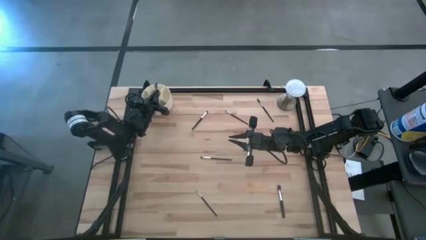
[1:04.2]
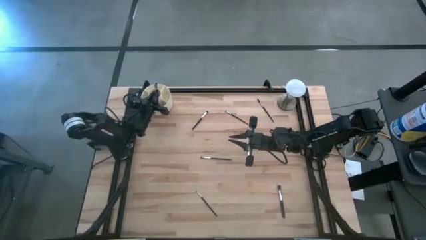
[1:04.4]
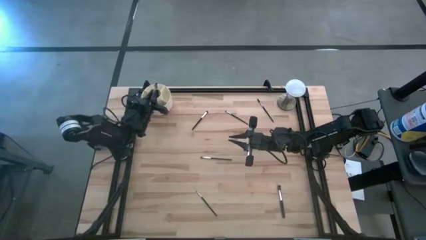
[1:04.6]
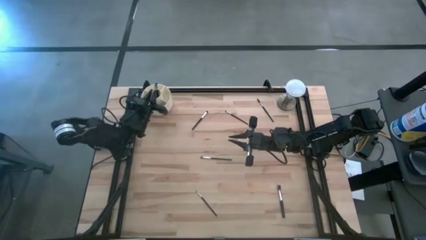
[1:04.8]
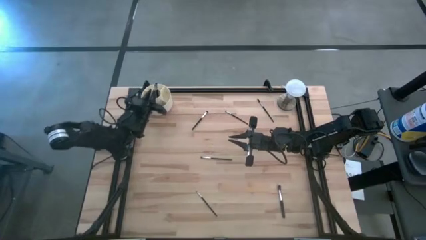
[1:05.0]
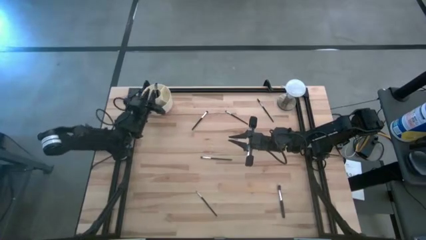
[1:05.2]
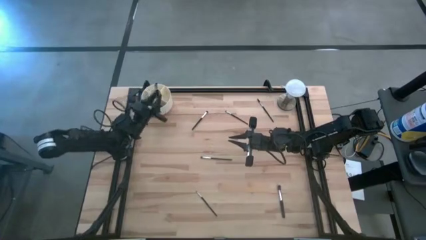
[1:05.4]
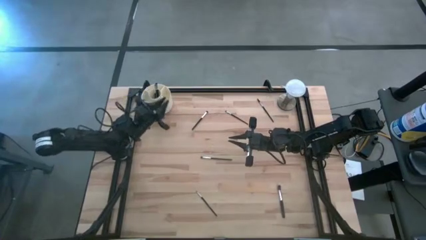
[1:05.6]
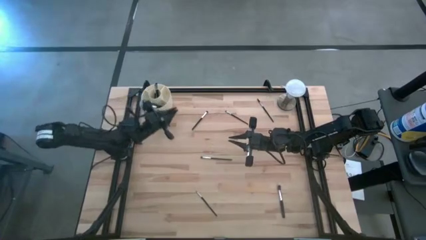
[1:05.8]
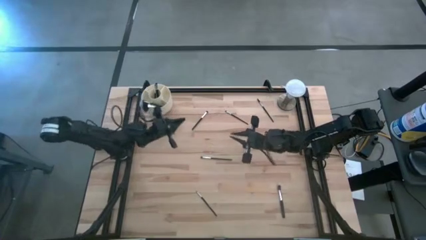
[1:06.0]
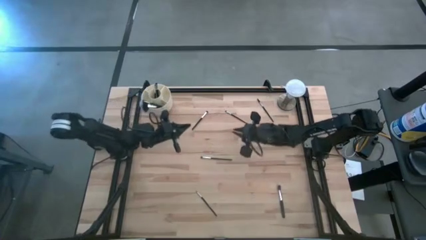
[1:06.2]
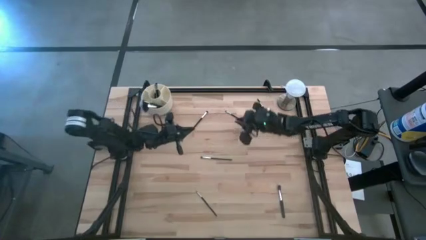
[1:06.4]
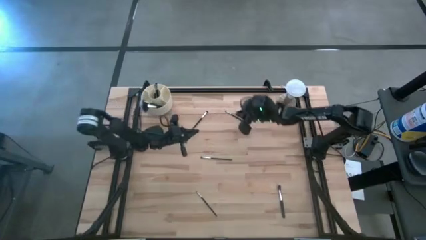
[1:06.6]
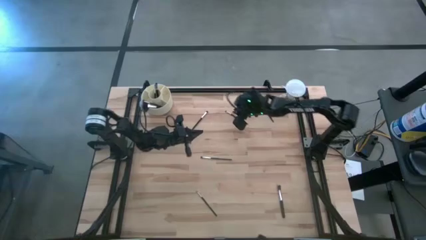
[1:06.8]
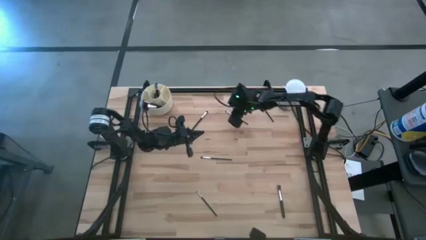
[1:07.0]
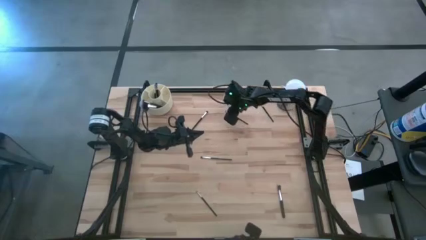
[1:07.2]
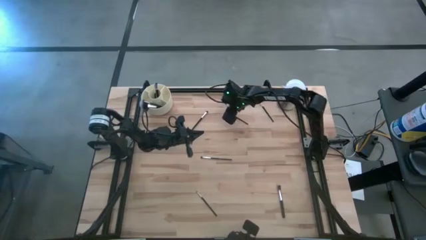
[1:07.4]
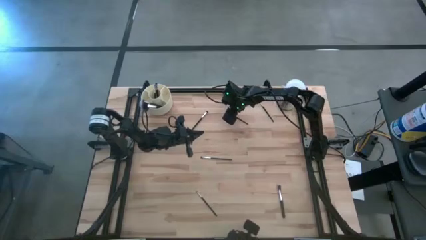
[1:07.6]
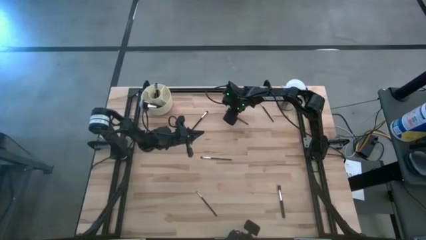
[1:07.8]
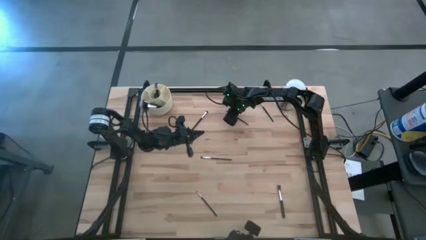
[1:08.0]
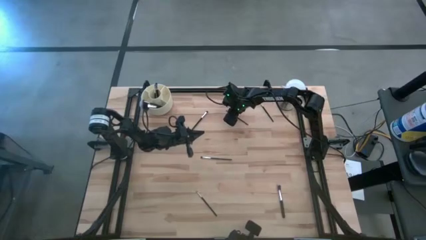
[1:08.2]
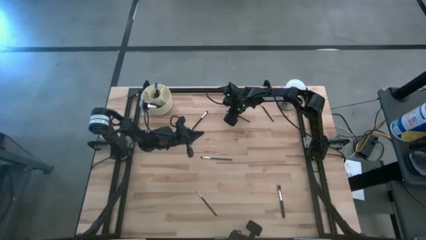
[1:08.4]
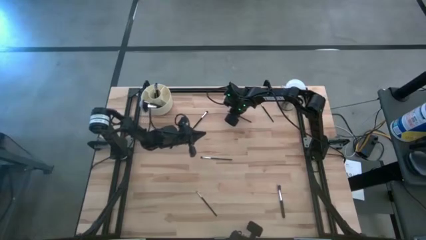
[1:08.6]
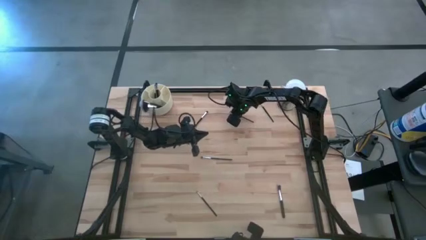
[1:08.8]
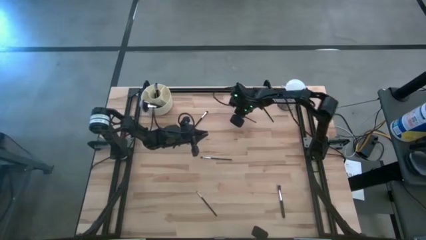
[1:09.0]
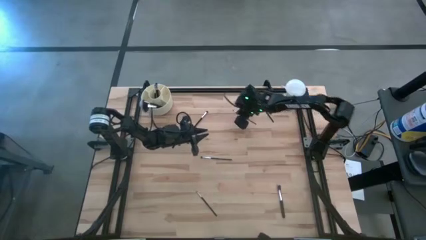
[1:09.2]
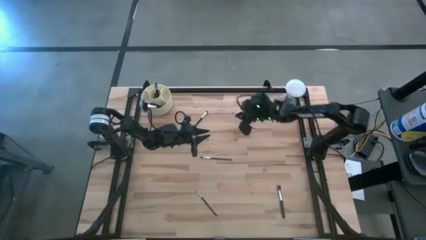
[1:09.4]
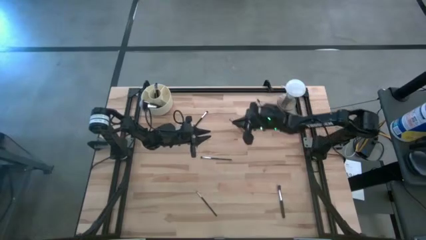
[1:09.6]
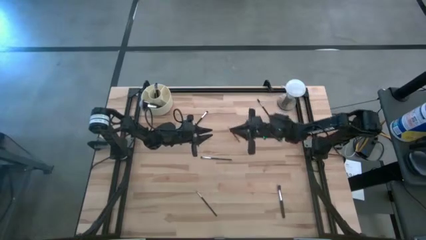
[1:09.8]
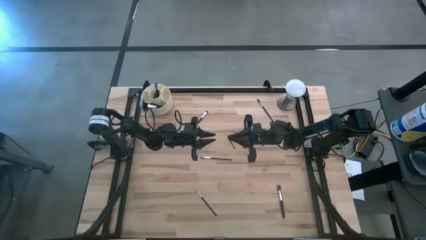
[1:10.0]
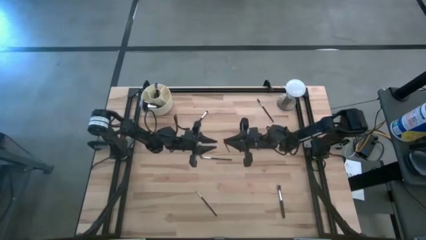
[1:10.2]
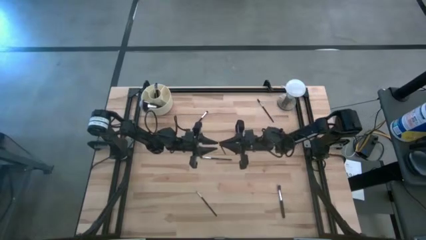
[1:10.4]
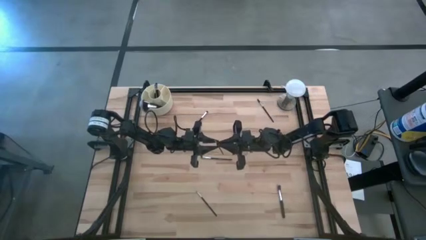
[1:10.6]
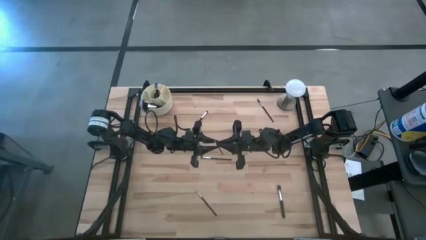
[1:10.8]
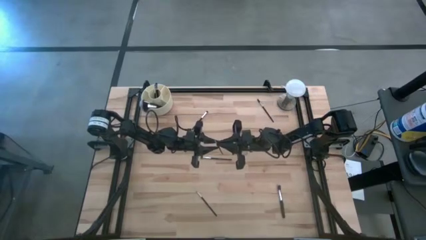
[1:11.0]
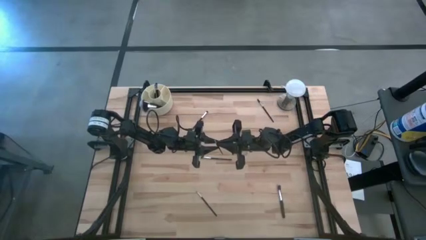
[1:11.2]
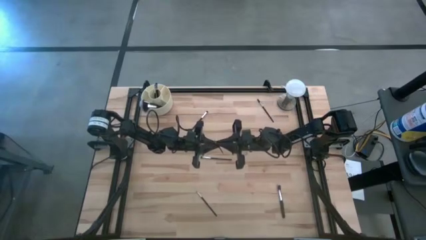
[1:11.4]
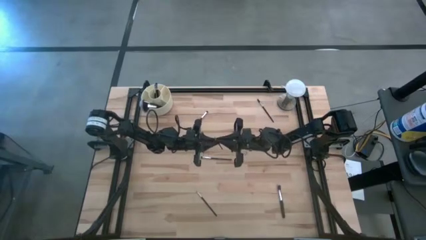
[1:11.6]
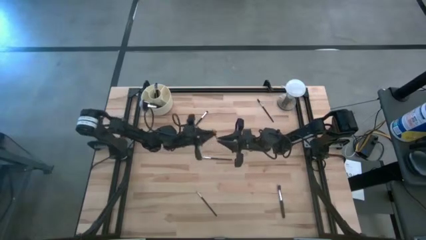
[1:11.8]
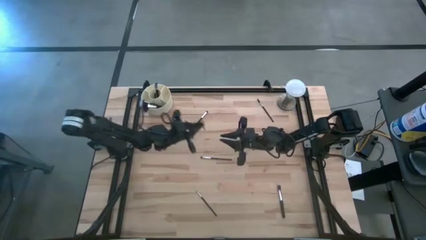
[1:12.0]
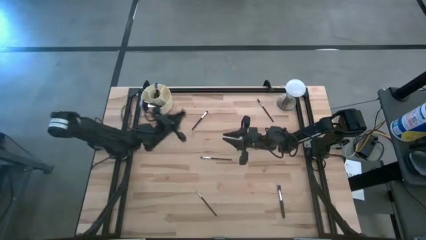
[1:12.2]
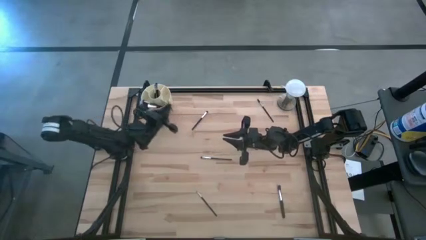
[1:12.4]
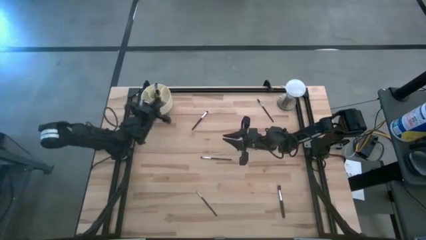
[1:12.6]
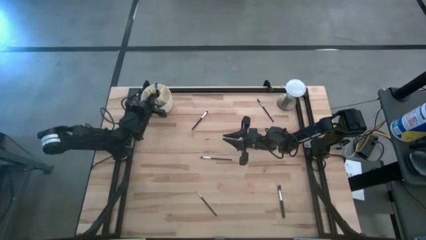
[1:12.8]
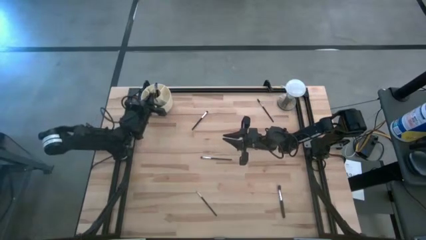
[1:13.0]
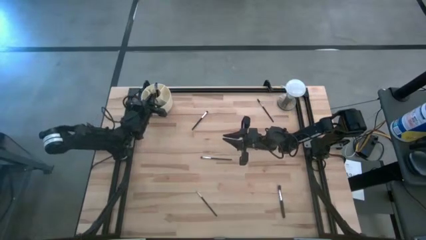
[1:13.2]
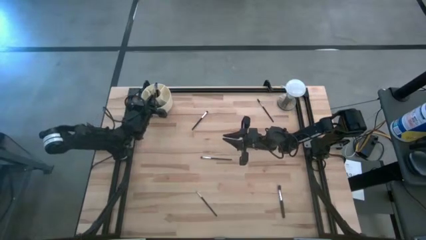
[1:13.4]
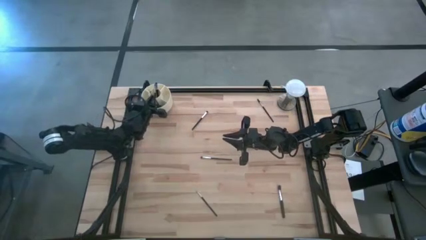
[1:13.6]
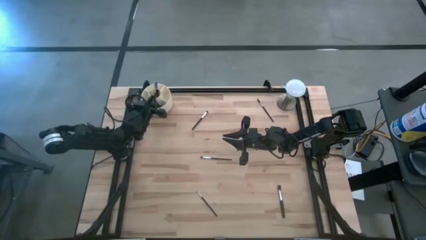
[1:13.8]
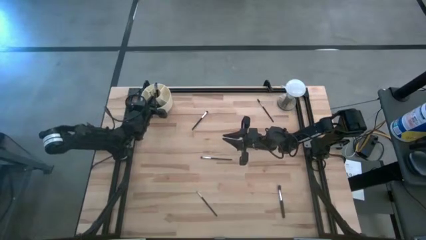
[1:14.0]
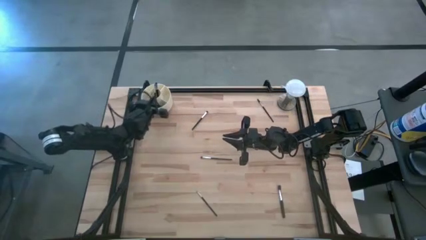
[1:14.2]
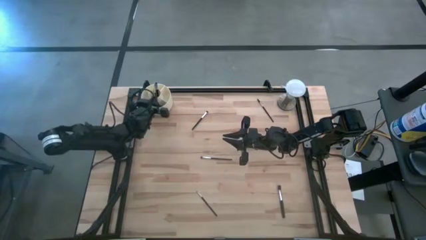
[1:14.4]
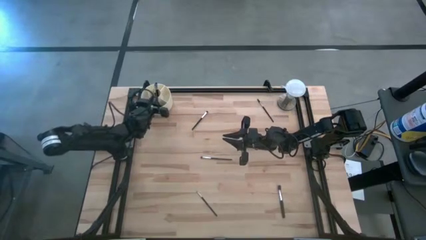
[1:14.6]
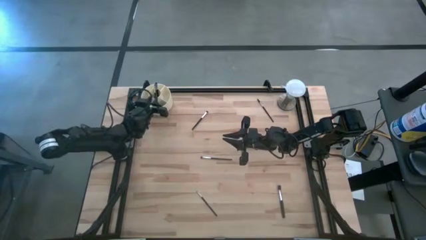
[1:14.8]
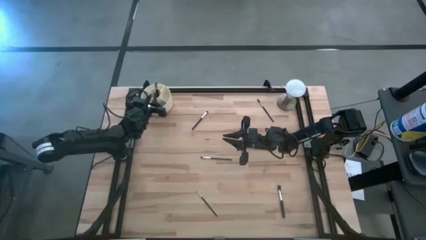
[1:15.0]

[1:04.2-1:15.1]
Task: Put items in baskets/containers
Put the eyeshadow brush into the organizer

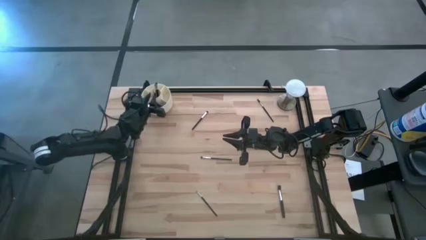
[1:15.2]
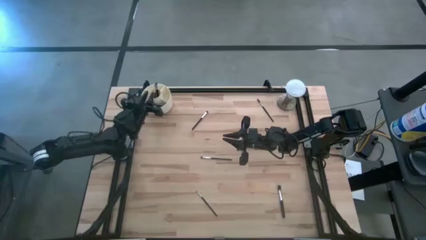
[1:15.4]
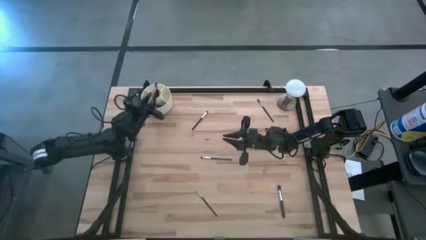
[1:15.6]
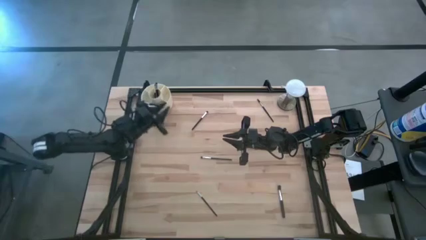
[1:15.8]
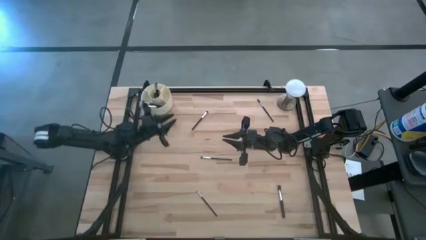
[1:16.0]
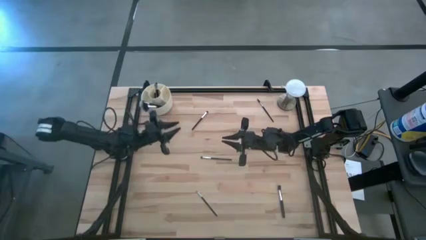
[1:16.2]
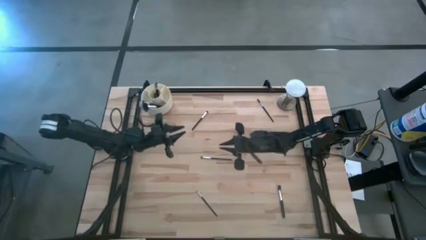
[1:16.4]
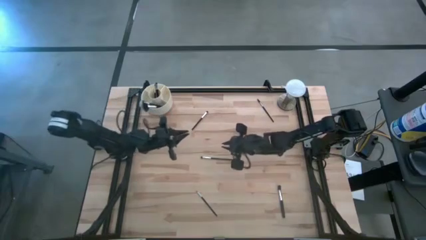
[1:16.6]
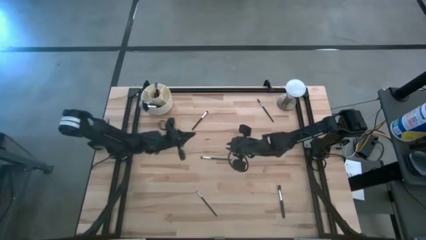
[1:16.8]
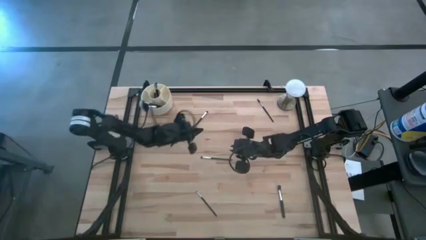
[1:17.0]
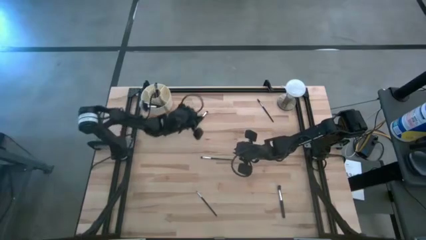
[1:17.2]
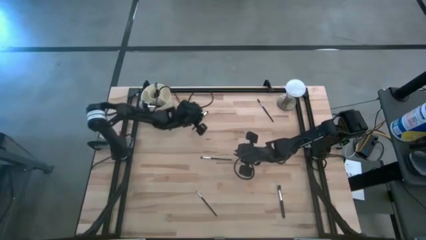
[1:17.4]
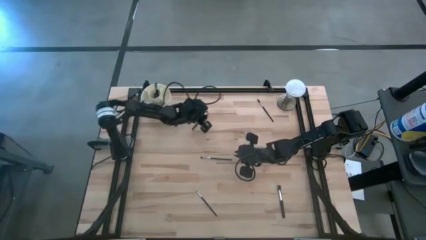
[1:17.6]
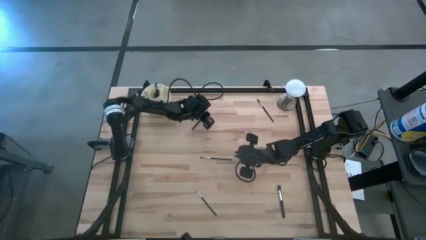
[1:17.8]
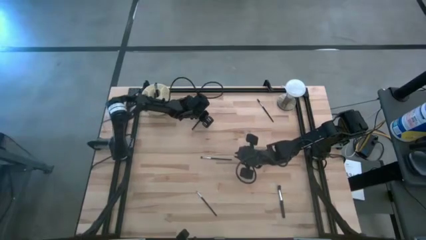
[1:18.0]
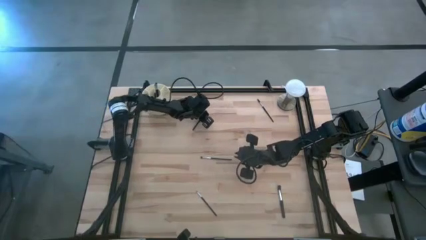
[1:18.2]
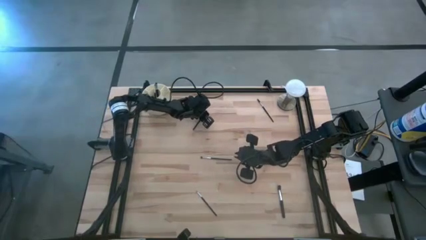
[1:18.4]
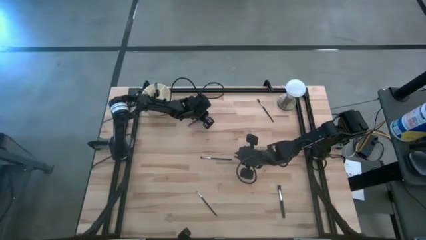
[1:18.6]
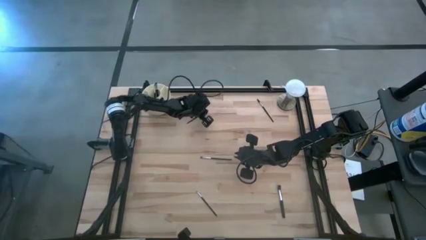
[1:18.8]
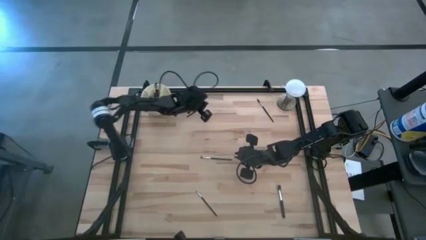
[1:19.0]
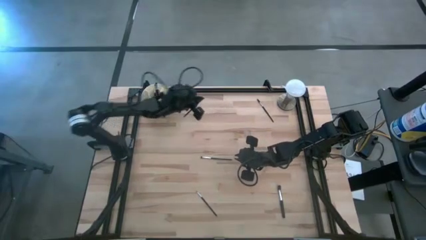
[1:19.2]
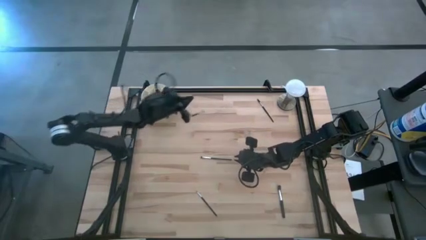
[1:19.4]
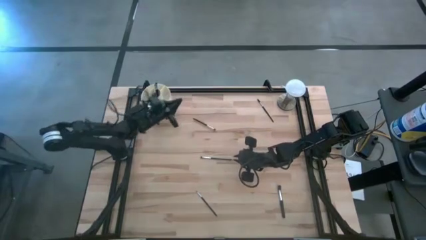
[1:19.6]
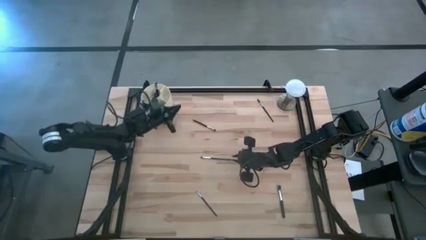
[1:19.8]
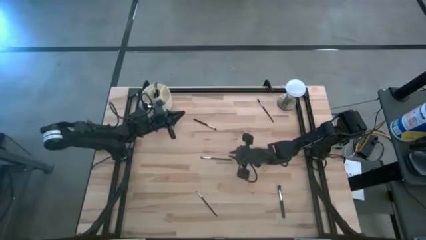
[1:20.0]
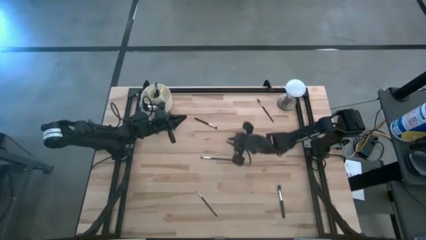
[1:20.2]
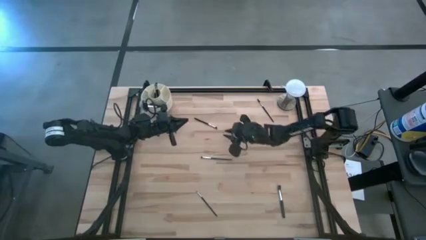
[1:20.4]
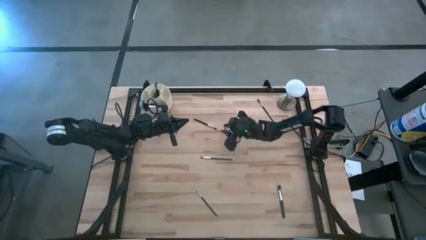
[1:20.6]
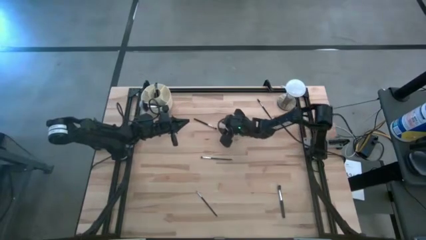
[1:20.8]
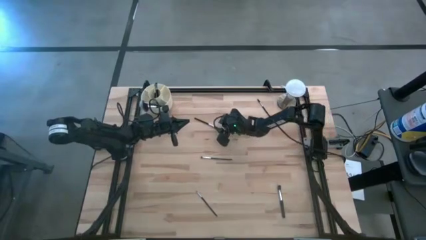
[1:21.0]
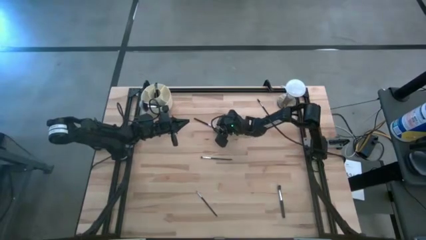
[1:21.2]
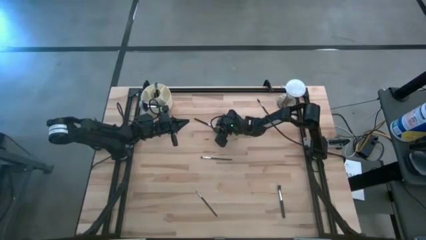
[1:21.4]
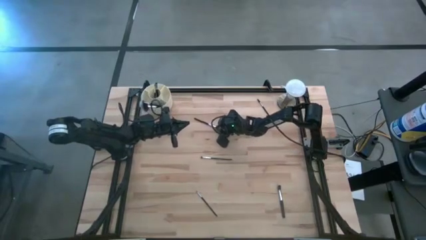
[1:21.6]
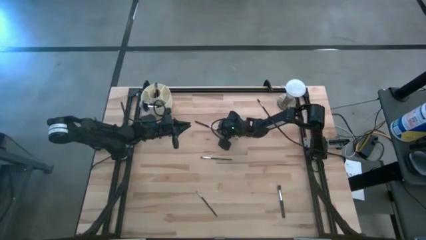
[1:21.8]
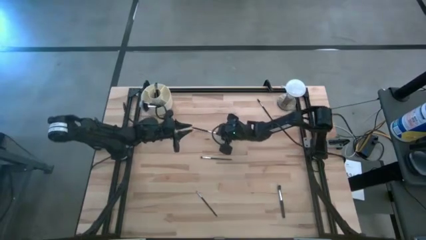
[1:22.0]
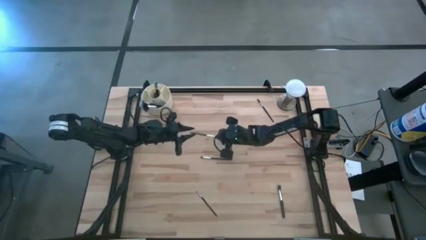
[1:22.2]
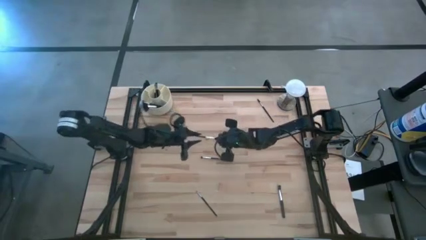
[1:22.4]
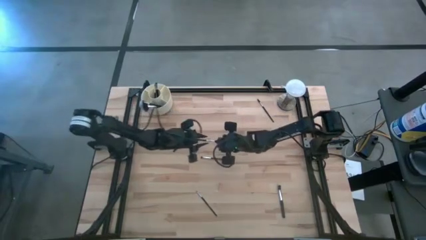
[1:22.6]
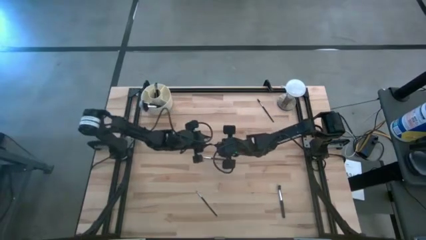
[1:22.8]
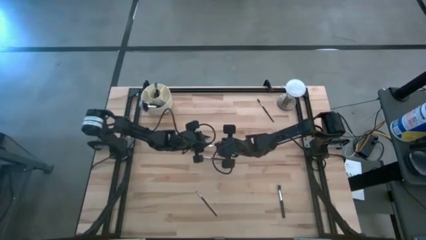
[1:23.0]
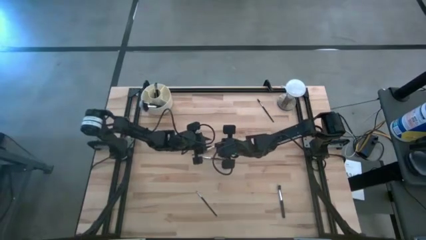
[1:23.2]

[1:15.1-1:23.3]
Put the eyeshadow brush into the organizer
